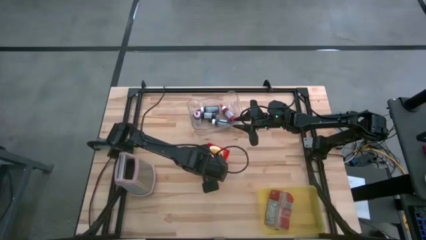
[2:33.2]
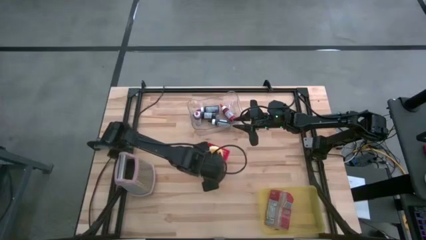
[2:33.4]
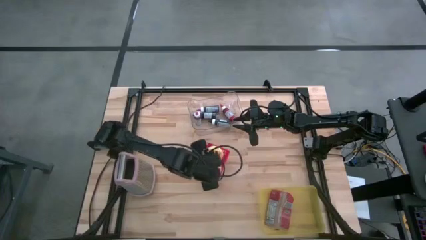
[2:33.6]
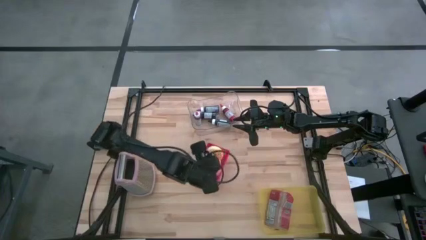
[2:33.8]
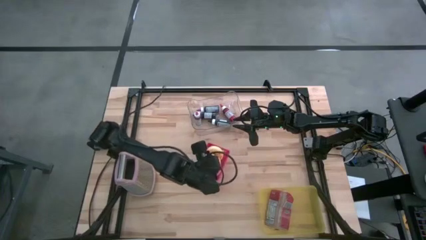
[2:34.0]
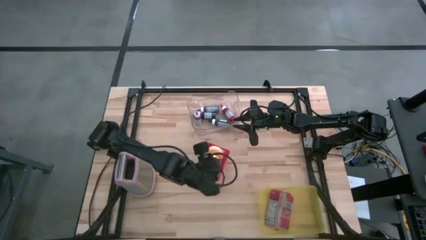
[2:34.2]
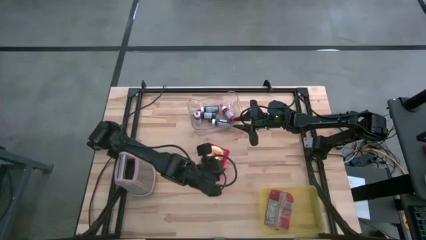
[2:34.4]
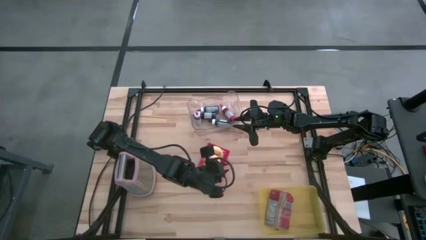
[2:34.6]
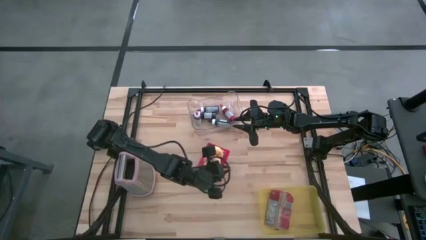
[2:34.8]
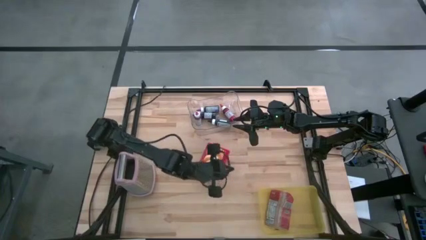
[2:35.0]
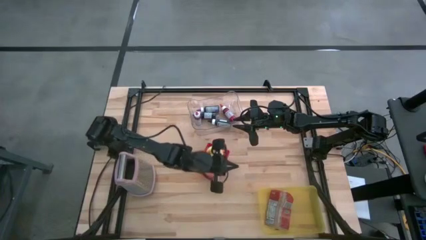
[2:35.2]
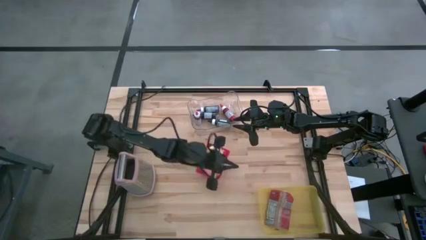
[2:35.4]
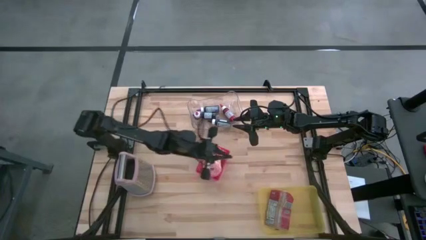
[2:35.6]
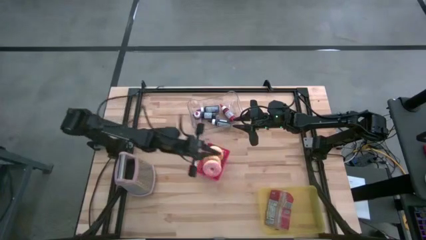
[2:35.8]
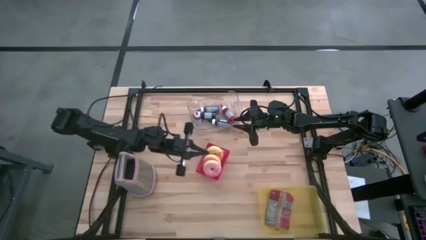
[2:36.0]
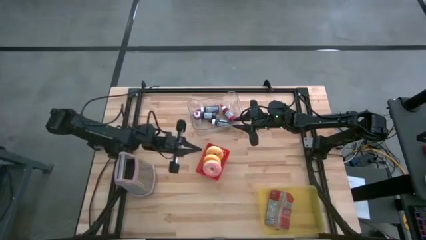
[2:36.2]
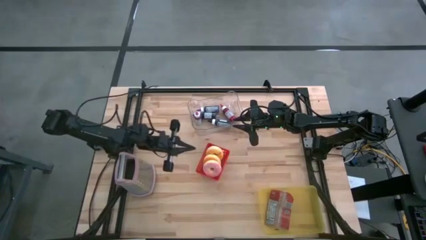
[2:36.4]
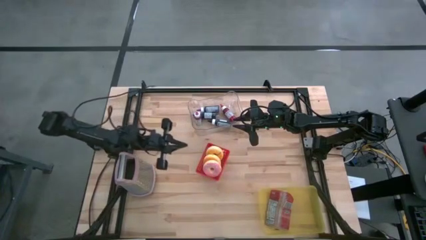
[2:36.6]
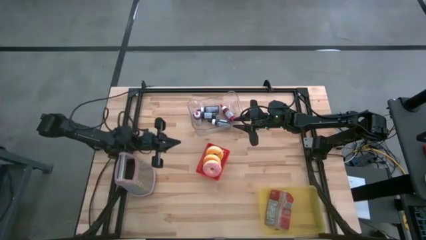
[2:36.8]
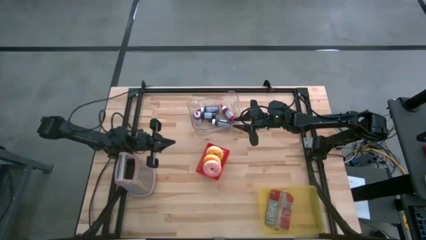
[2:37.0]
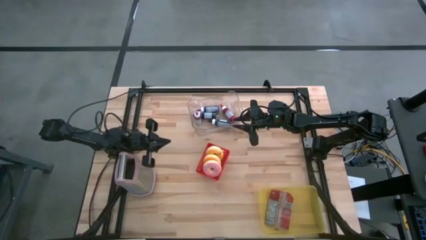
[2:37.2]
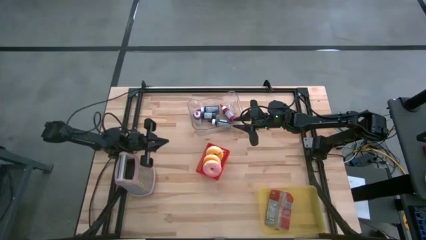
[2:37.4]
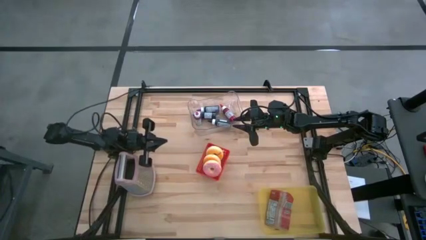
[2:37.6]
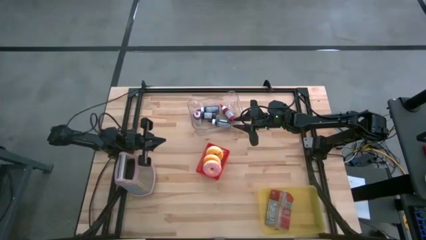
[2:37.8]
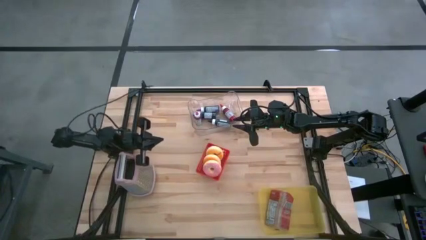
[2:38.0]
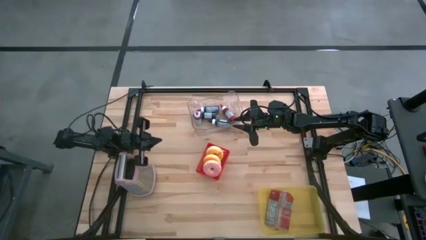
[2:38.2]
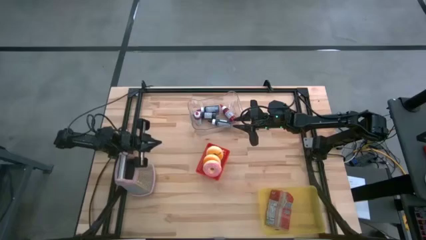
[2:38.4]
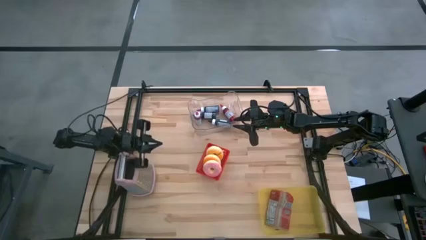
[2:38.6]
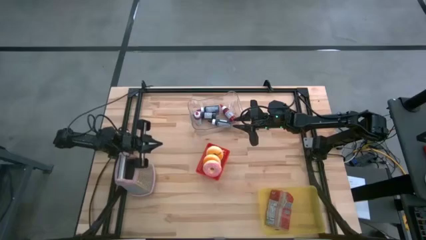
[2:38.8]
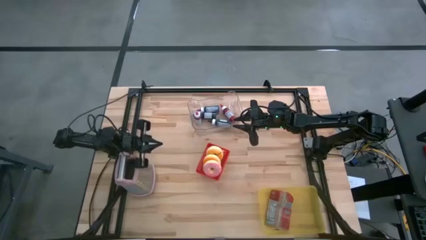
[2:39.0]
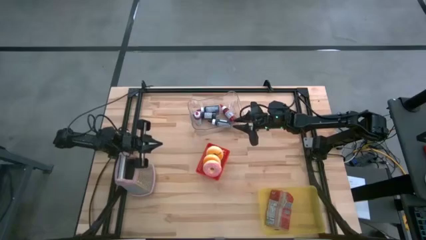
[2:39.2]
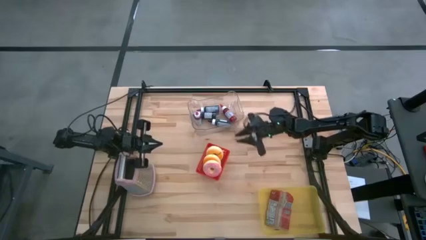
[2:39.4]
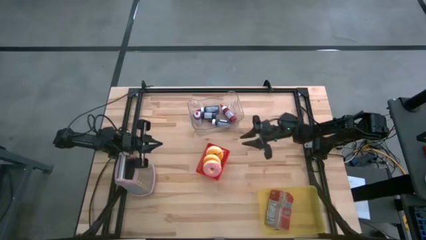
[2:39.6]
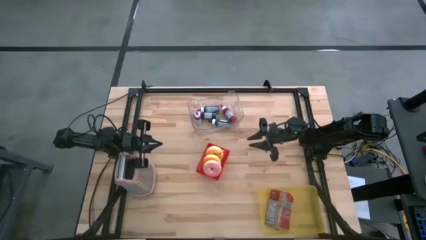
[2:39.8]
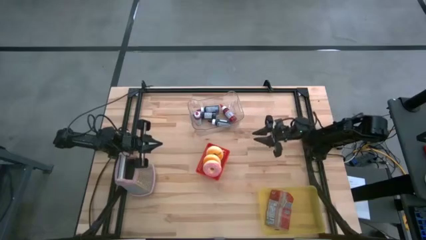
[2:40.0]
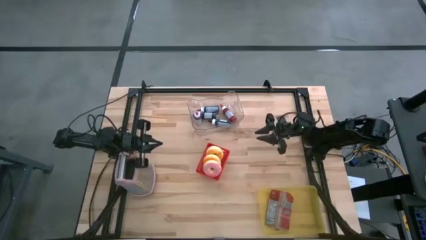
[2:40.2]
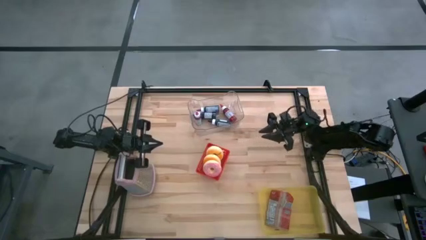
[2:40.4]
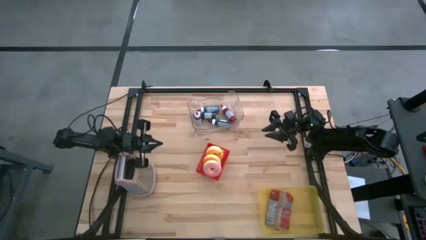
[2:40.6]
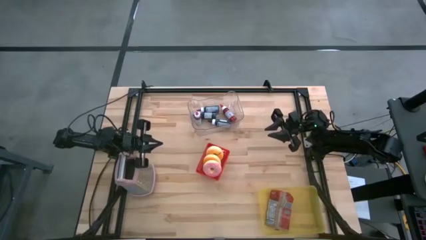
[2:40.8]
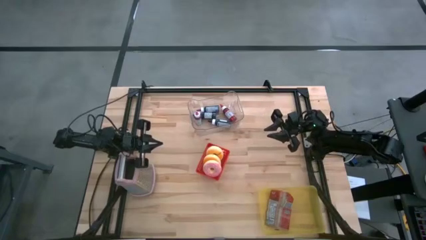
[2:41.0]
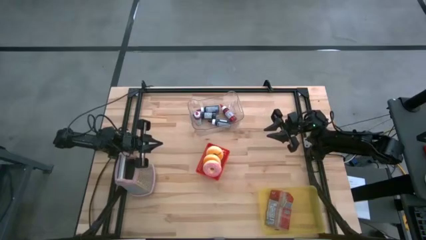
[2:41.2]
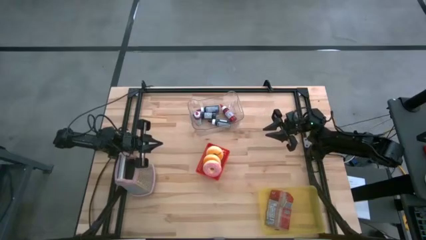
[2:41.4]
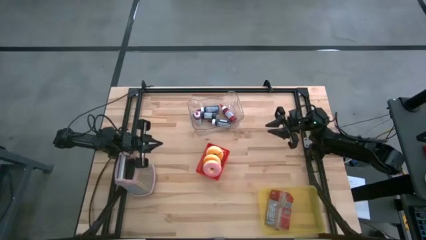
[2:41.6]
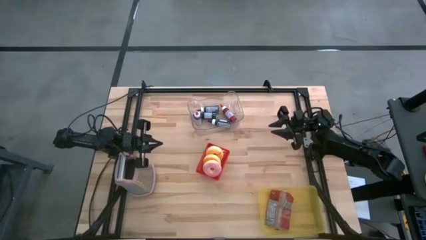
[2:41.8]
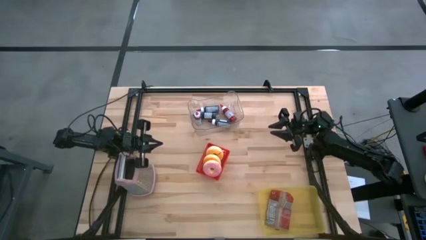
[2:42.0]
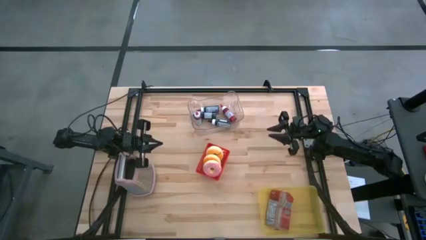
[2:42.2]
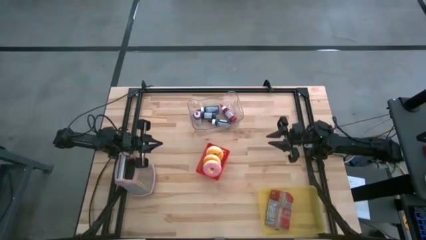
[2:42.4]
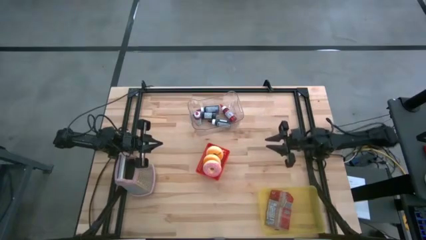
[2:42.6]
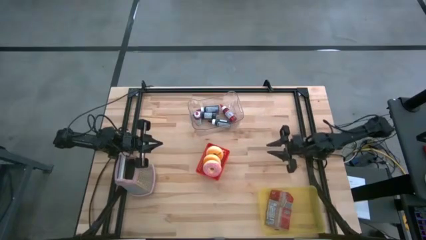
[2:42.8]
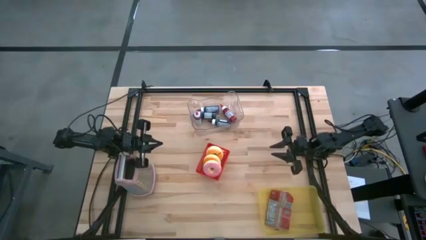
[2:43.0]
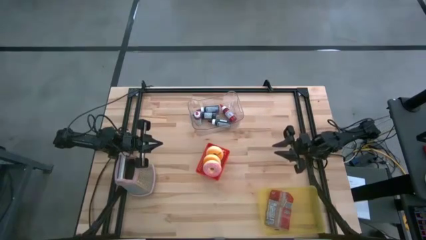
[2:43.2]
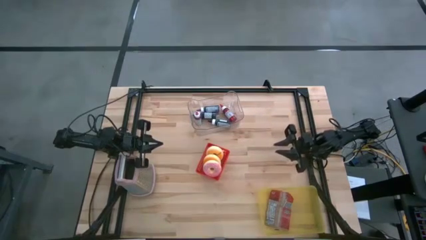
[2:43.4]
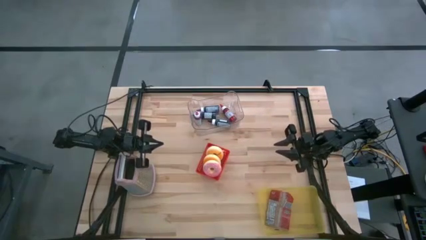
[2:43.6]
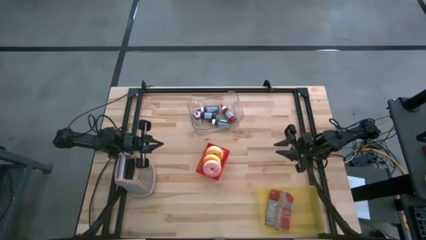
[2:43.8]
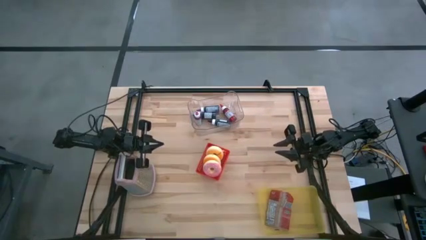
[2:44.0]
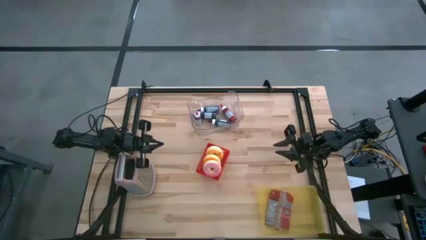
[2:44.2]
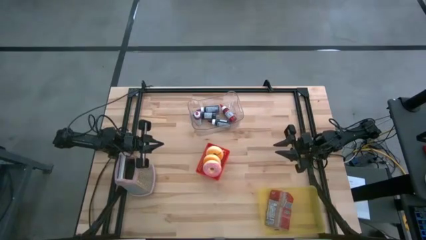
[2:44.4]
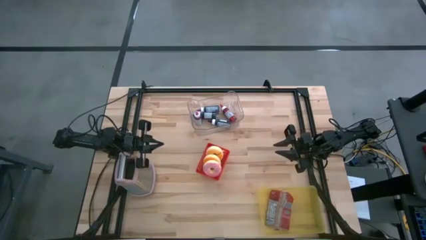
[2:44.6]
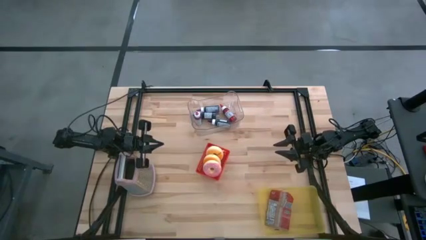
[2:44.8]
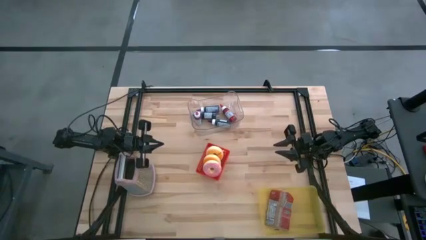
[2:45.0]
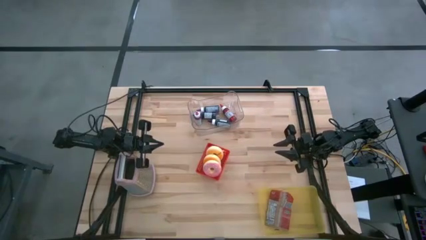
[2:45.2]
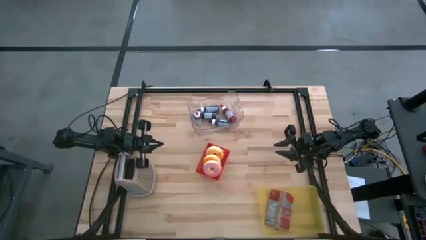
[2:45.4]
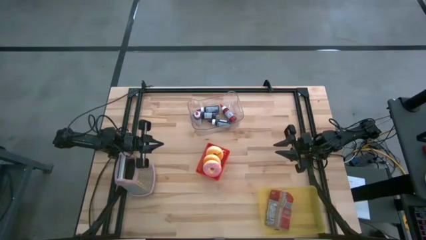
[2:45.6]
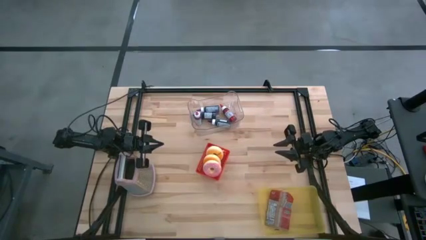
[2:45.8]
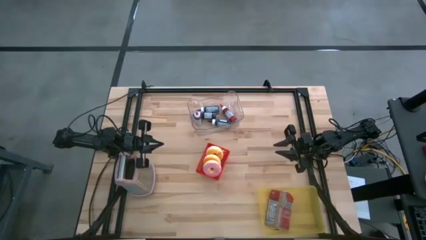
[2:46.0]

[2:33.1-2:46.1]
Task: Pick & Place Food Item
Return to Home Position

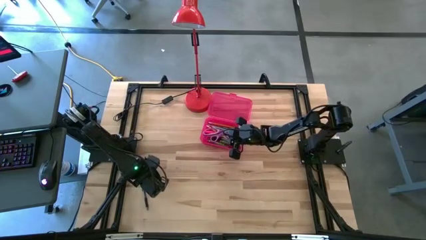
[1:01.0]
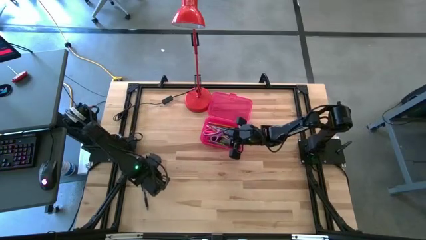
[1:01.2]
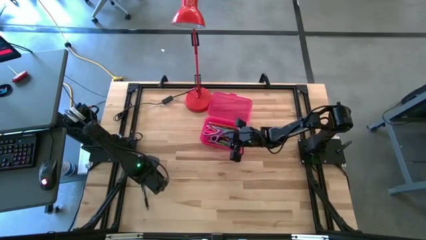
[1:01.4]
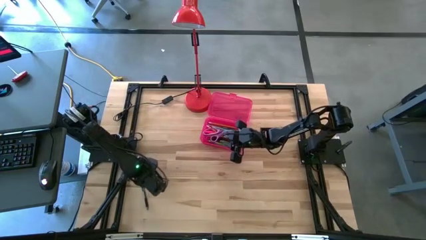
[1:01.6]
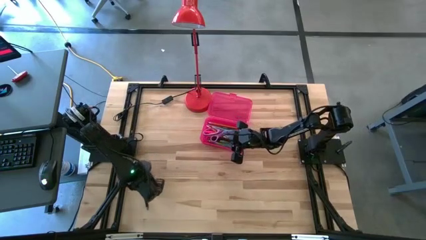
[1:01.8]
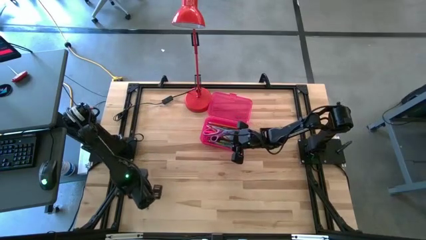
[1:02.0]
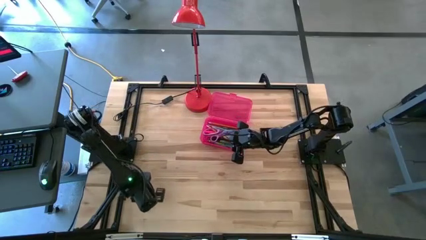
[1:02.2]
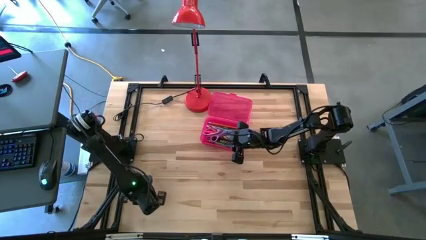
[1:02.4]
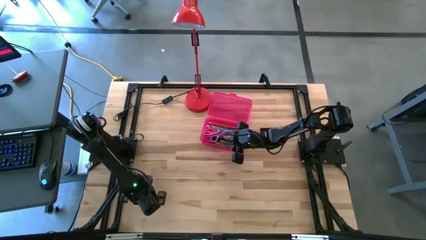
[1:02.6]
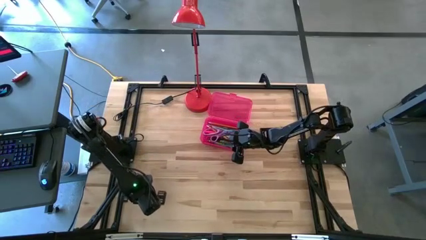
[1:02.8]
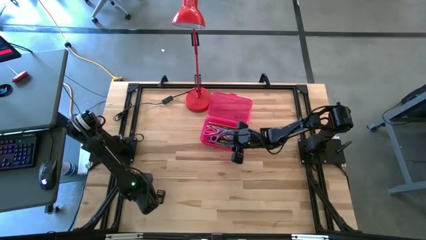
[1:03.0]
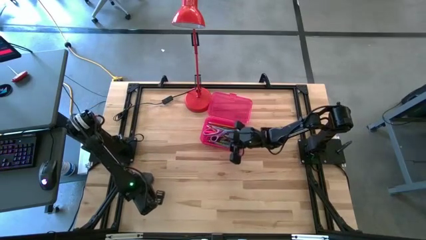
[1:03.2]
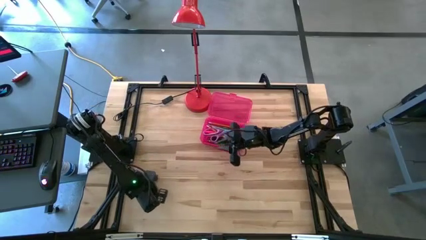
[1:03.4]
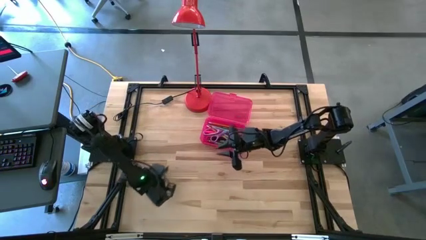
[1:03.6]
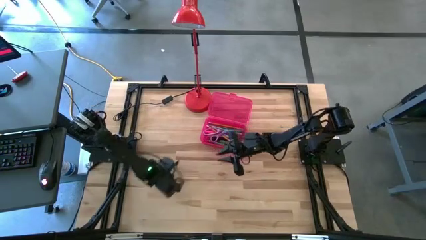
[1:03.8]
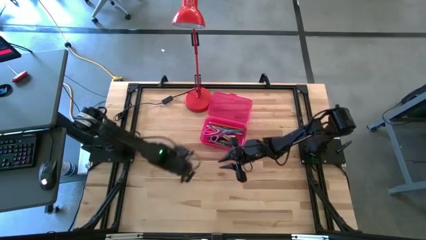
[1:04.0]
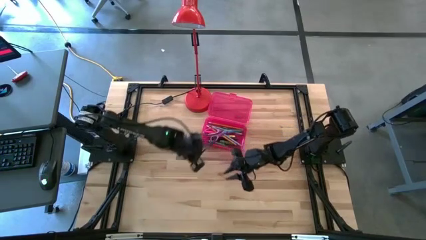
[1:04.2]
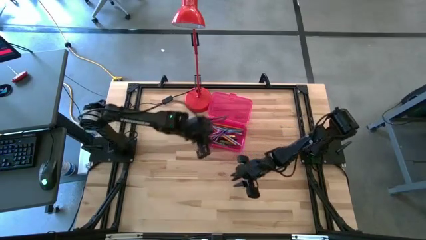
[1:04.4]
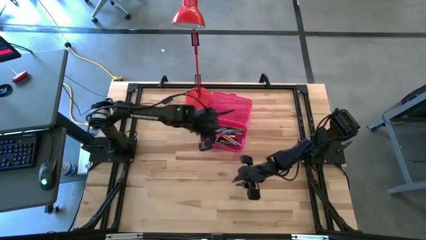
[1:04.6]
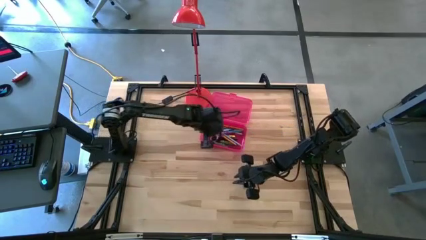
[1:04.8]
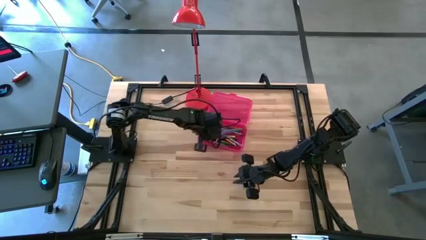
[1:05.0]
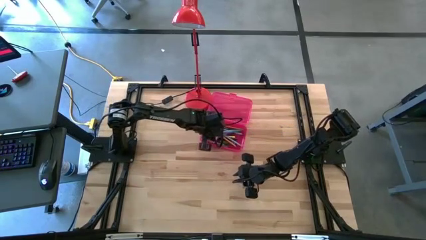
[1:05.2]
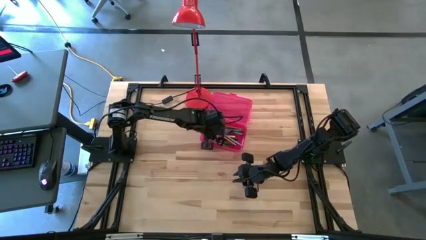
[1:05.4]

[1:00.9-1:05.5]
Task: Pick & place school supplies into a supply box
Put the transparent pen into the pink supply box
